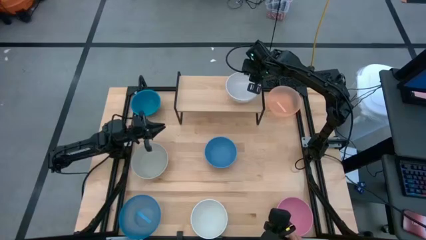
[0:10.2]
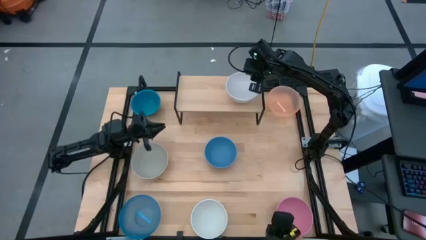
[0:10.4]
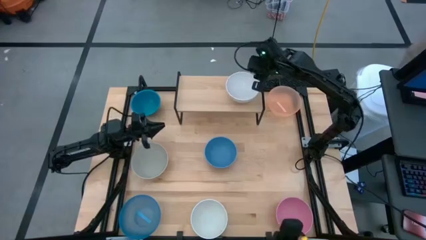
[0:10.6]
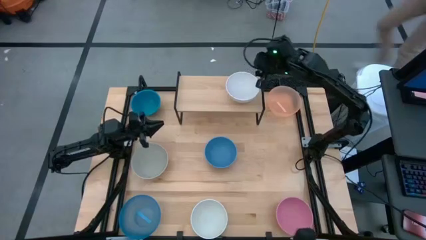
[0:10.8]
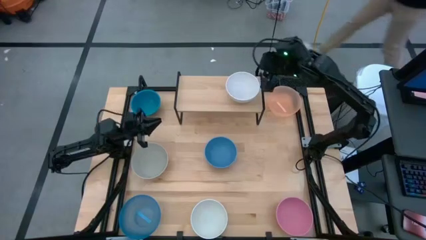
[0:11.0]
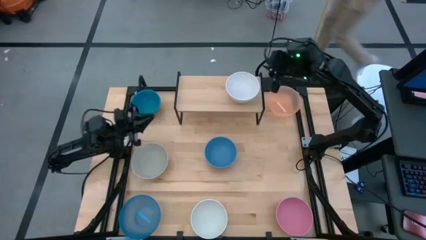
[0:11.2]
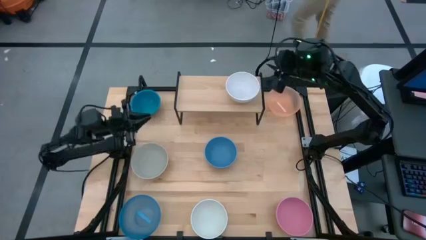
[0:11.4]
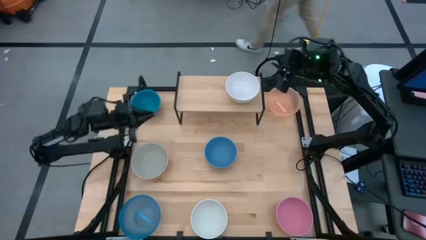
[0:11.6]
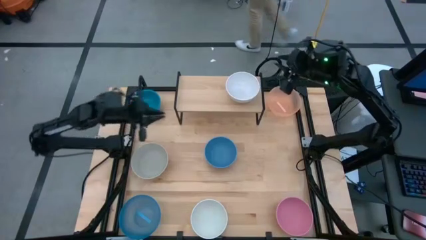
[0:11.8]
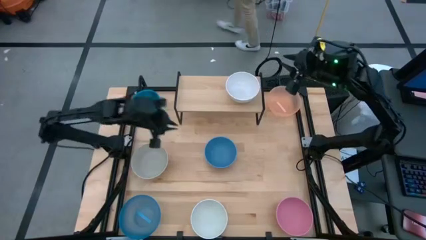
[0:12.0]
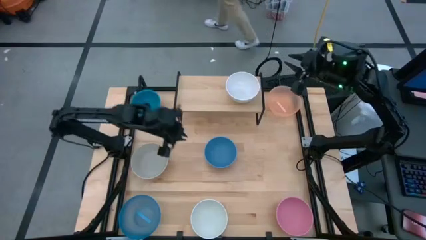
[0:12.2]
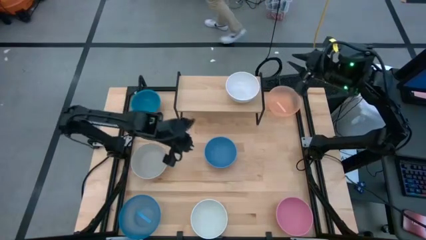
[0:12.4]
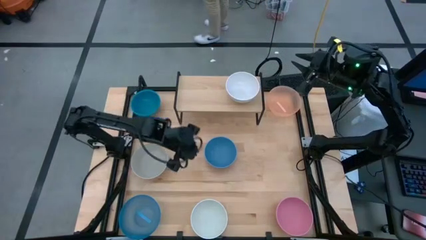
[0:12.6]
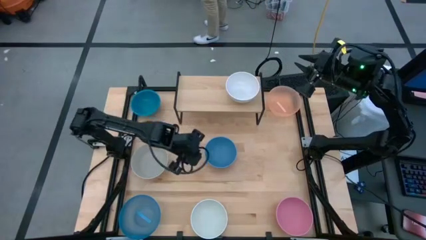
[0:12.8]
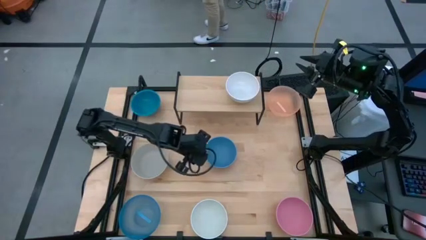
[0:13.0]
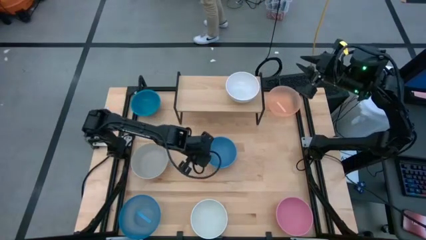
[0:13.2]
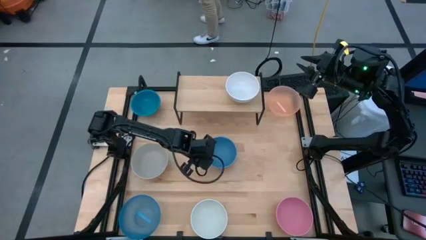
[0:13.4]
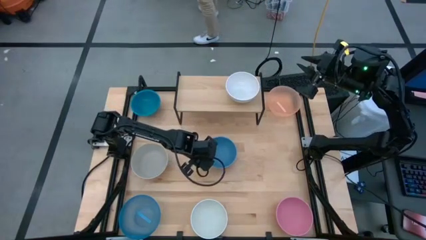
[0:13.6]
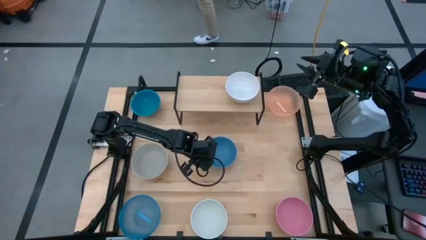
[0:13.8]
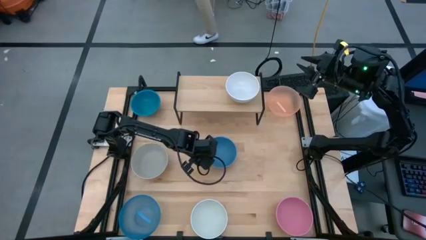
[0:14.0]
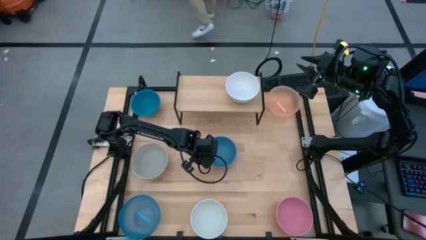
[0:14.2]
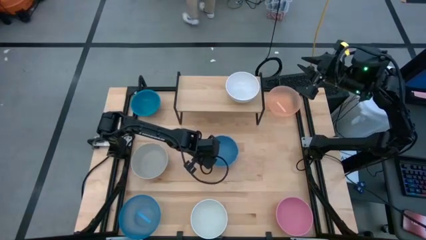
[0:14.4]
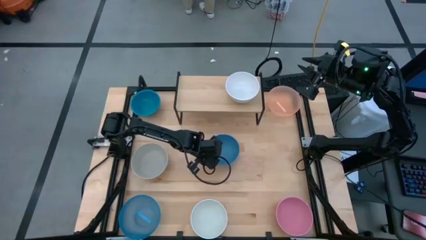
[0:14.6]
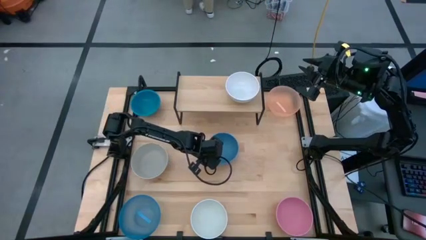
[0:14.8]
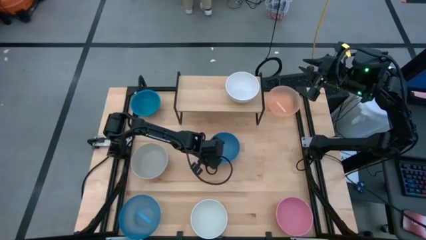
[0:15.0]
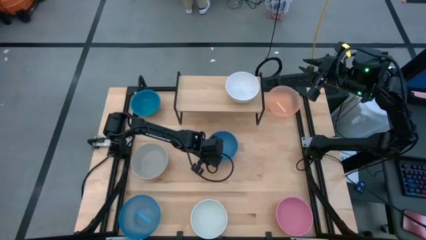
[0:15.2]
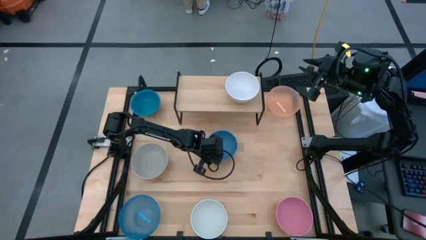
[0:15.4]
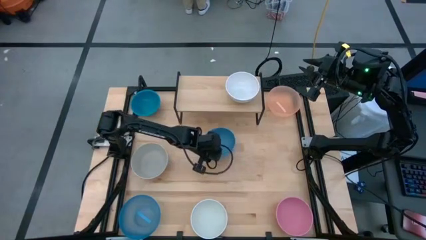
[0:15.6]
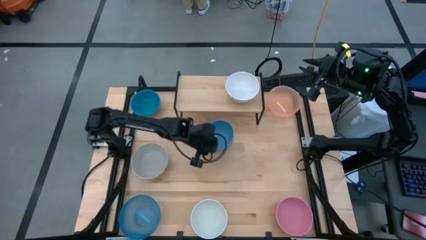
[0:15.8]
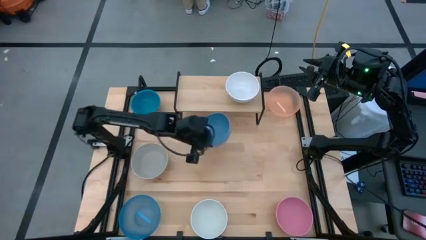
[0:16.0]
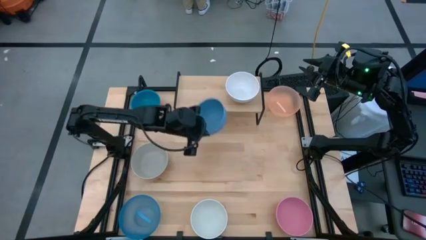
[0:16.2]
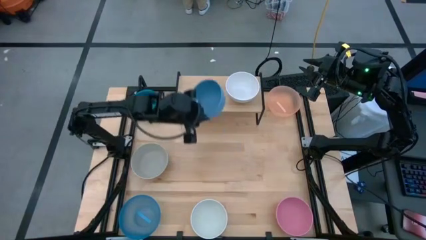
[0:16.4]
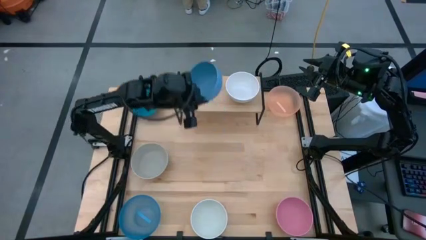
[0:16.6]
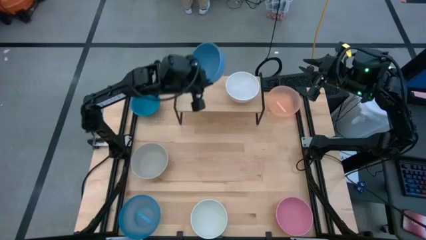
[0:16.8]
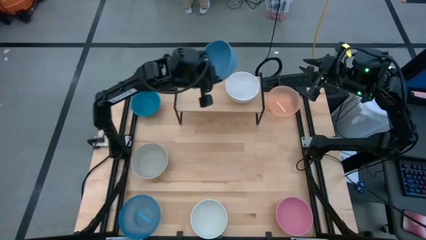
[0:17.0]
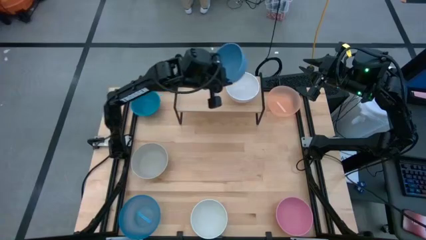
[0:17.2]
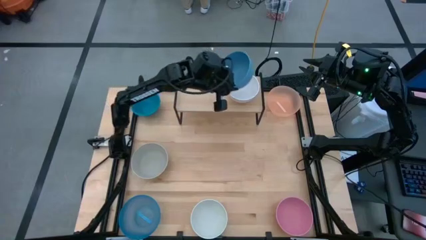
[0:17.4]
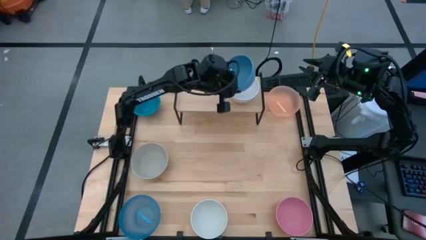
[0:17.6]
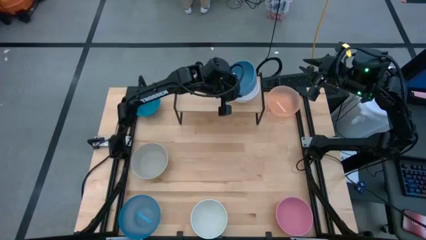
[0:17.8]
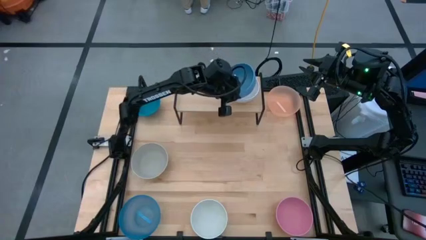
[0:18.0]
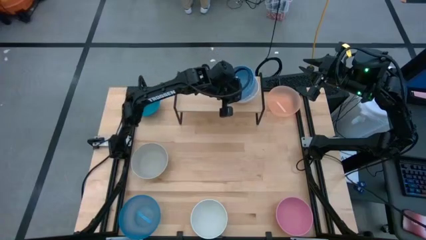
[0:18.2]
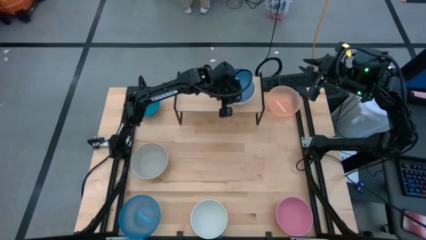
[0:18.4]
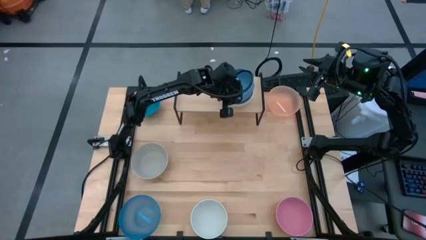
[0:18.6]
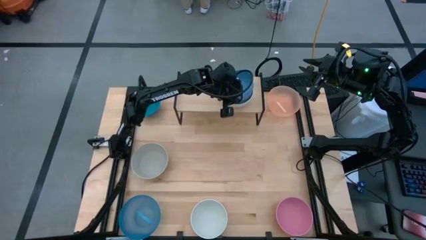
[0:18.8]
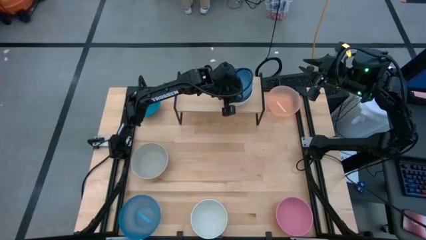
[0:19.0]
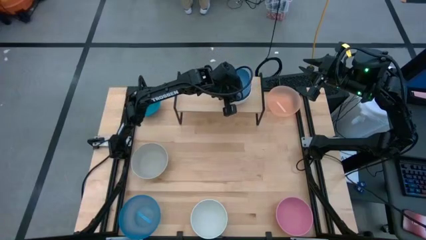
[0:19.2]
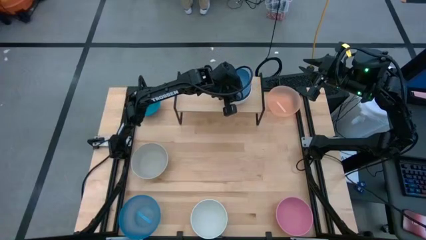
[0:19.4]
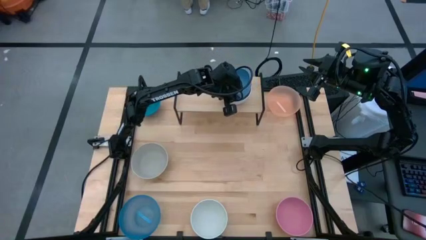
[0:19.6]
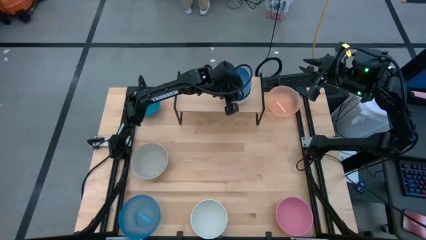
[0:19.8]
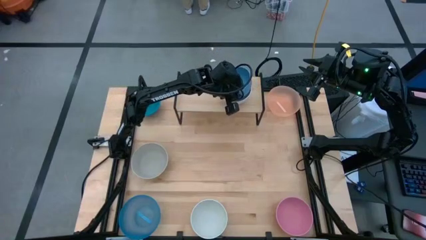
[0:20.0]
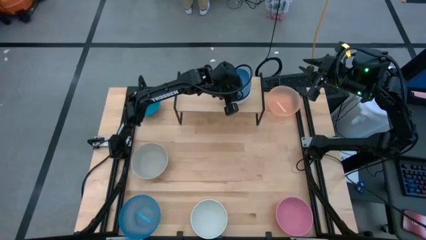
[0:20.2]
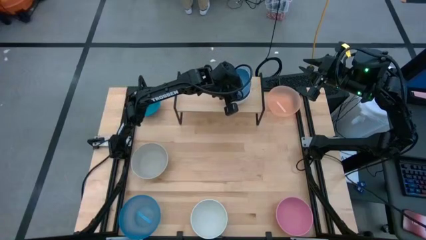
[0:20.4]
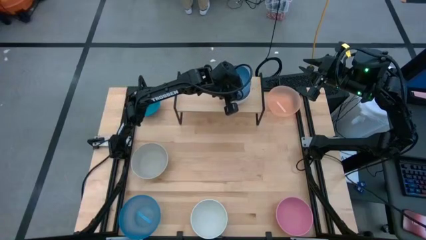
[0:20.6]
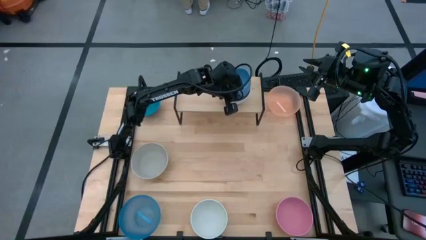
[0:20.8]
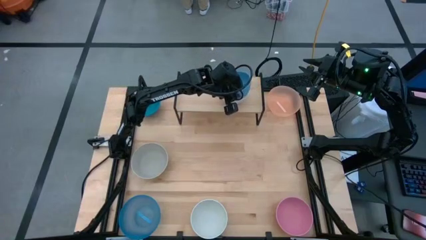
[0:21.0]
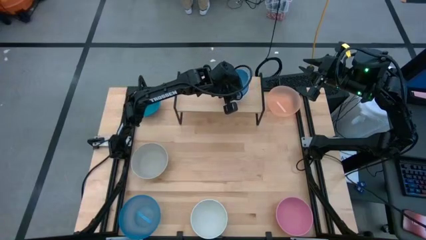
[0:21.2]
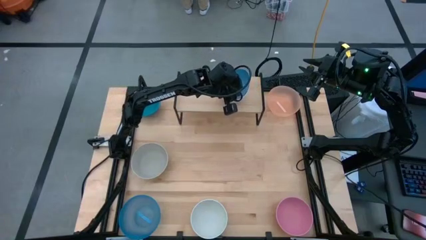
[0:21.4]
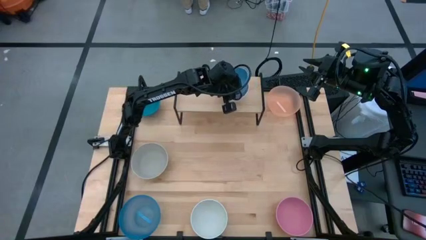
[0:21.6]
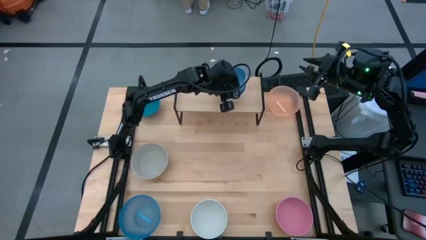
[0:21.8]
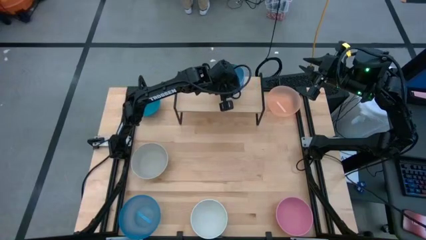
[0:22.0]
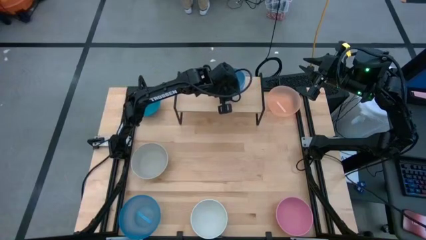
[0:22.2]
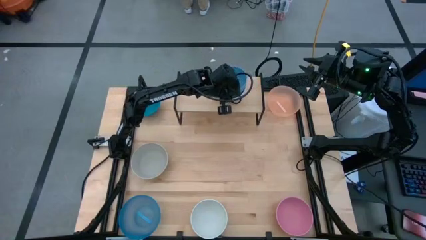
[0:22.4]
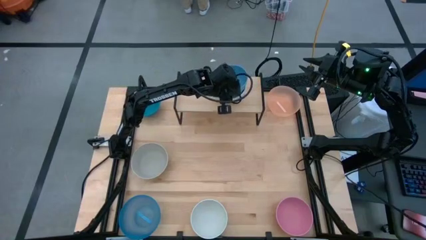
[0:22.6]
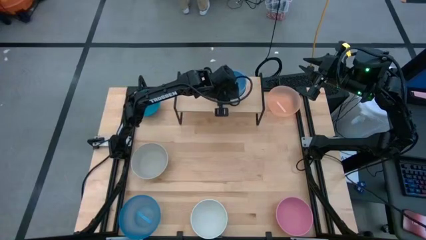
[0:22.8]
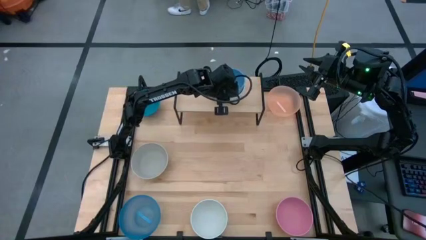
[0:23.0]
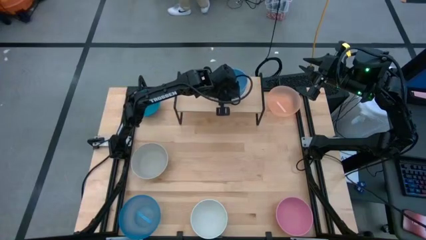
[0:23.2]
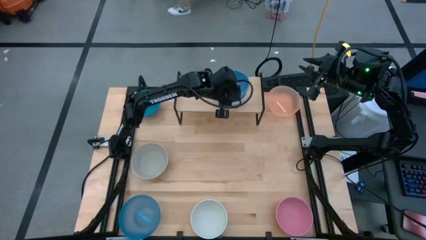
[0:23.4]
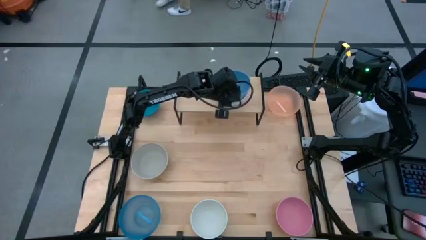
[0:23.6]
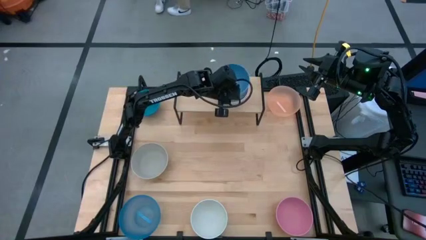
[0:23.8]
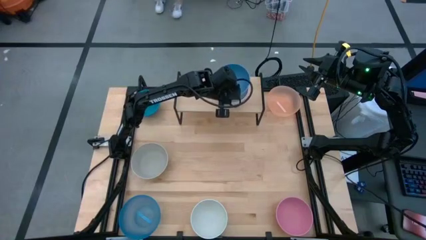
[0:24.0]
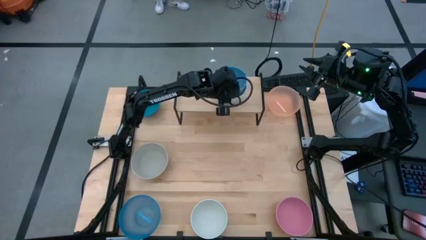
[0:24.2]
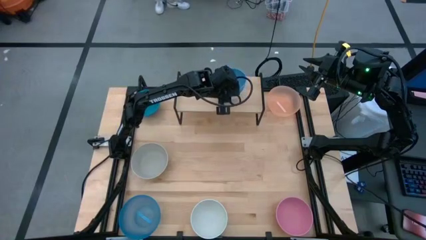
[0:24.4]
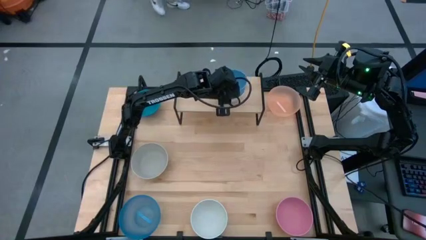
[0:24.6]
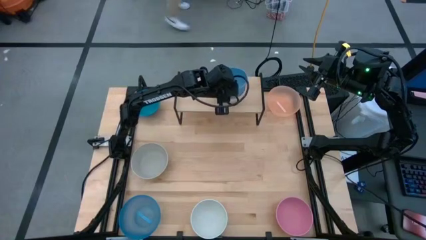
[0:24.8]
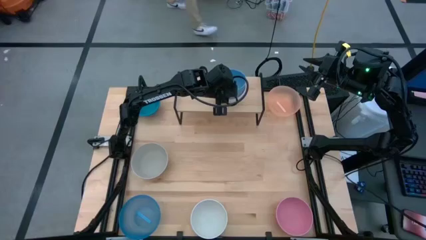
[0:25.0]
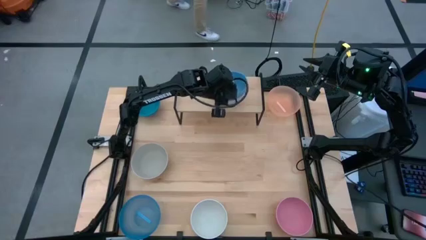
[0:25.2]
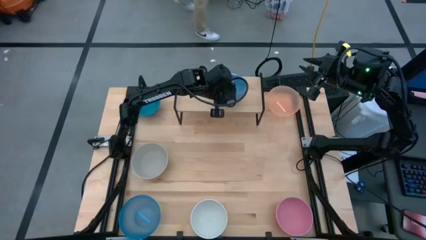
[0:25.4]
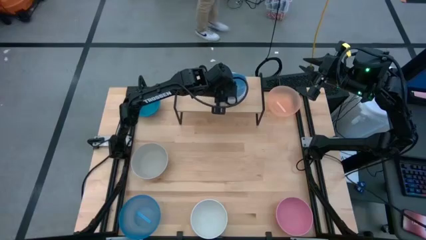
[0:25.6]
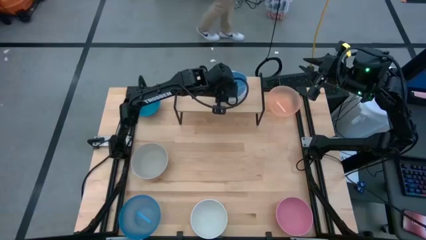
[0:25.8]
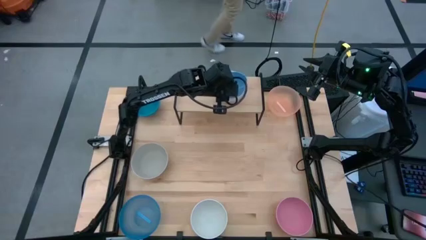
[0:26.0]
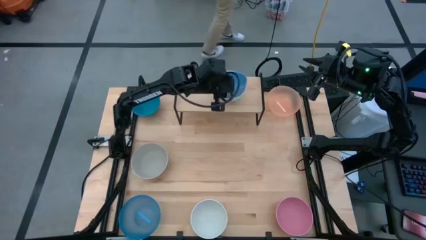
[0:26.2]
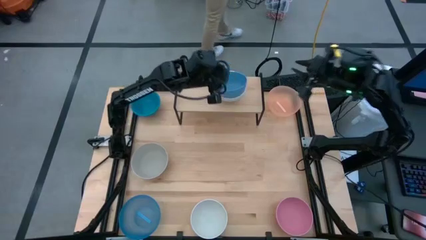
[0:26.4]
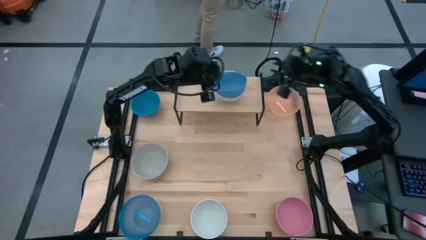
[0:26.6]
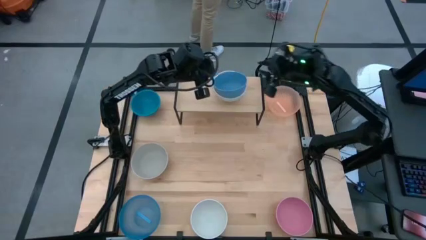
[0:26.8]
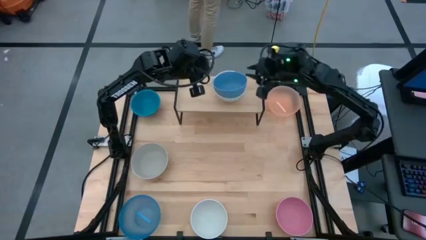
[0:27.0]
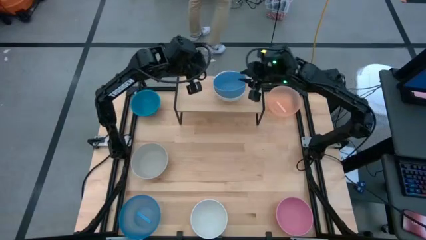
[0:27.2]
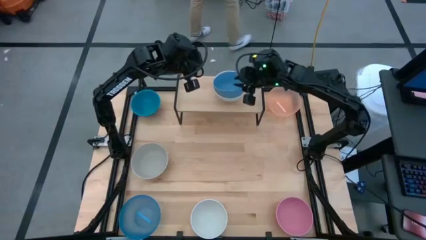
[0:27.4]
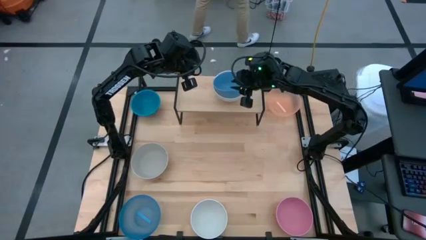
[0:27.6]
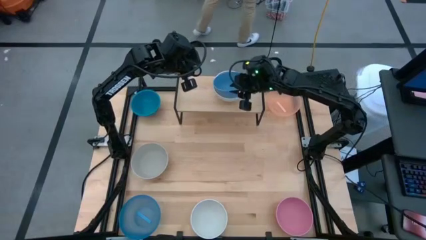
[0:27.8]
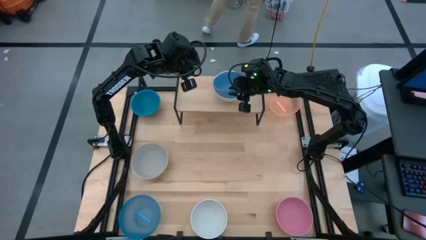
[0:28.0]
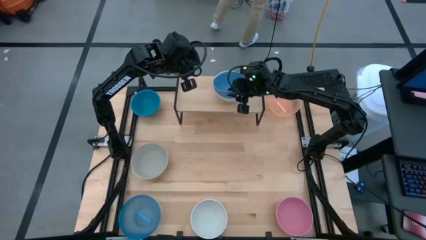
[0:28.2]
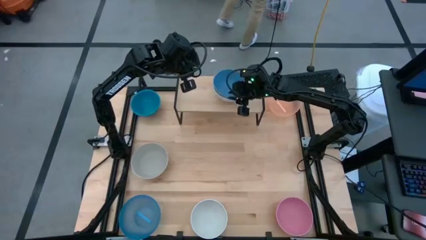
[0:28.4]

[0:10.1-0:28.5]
Task: Place and stack bowls onto a shelf
Stack the bottom blue bowl on top of the white bowl on the shelf
